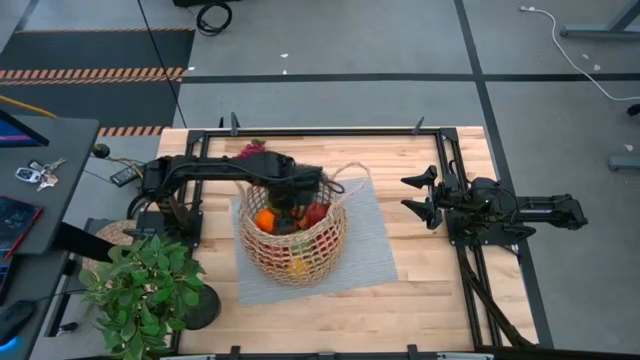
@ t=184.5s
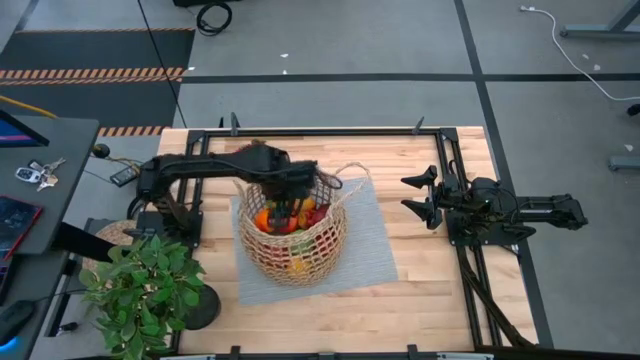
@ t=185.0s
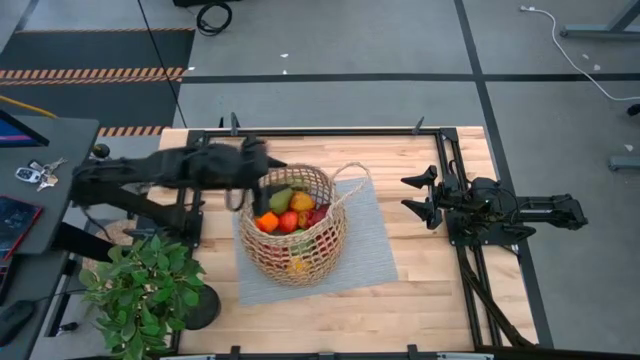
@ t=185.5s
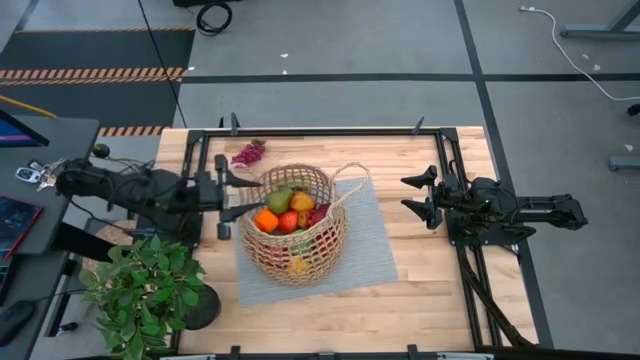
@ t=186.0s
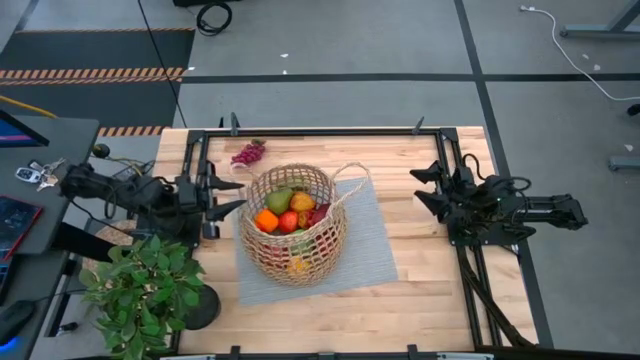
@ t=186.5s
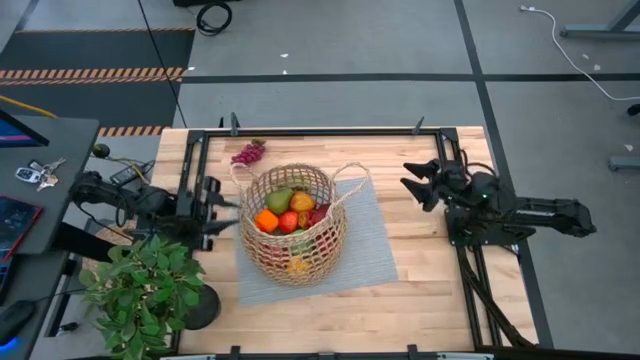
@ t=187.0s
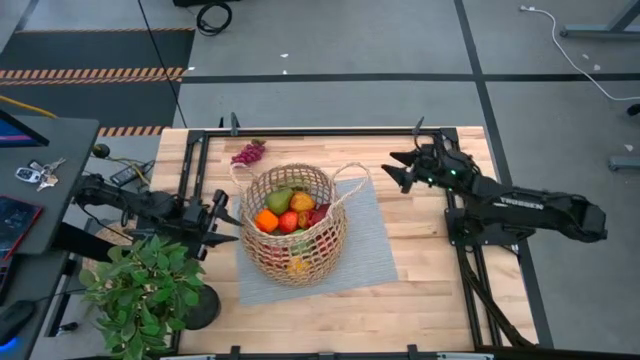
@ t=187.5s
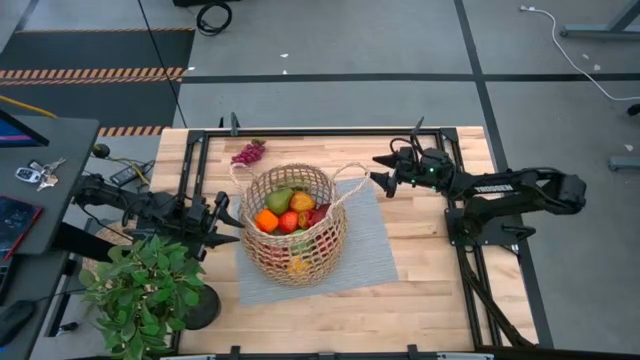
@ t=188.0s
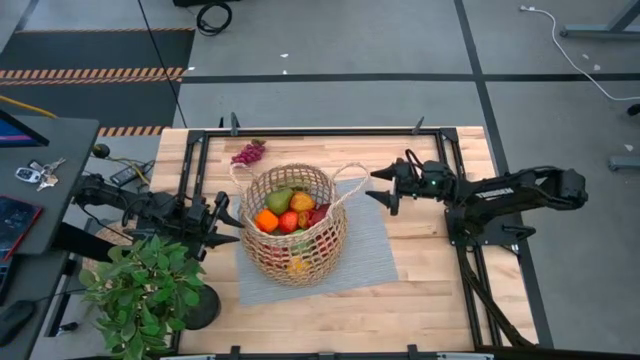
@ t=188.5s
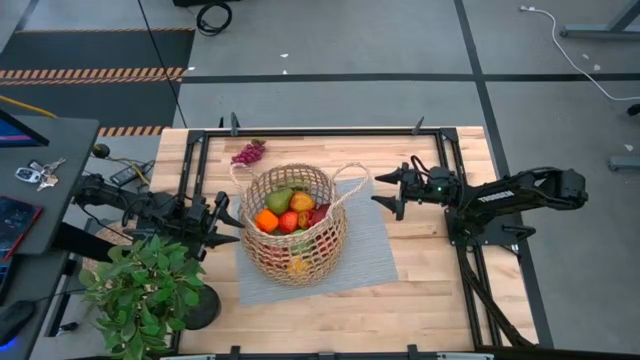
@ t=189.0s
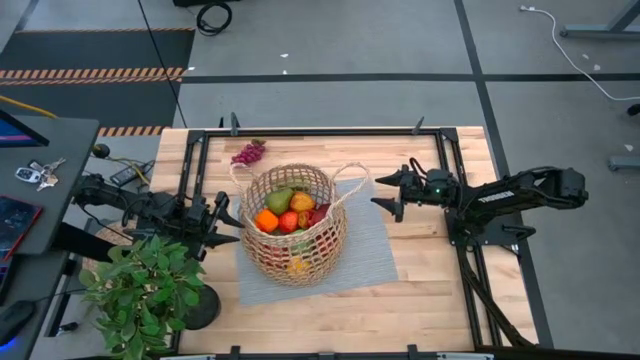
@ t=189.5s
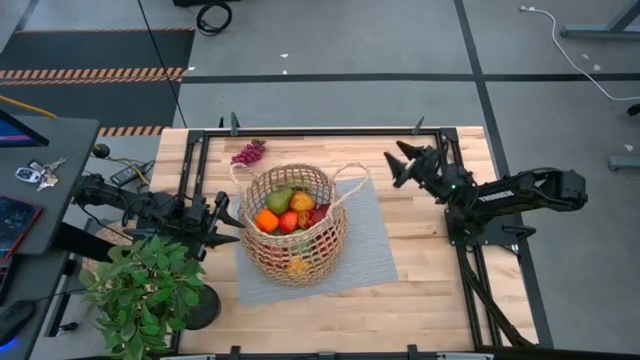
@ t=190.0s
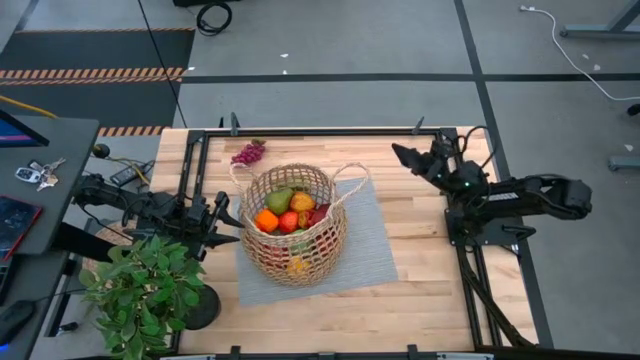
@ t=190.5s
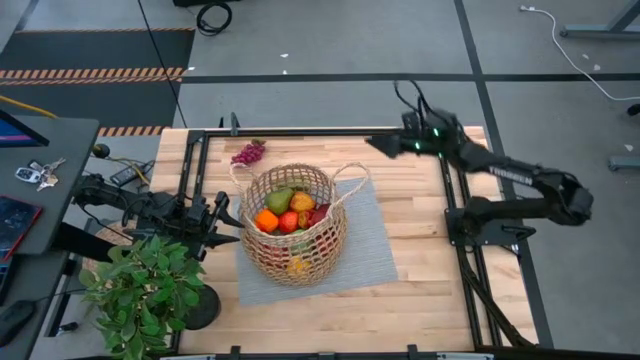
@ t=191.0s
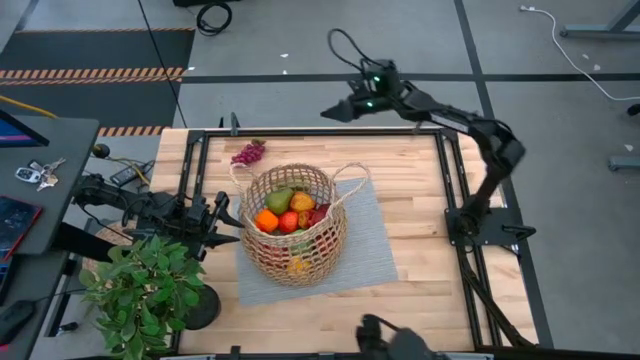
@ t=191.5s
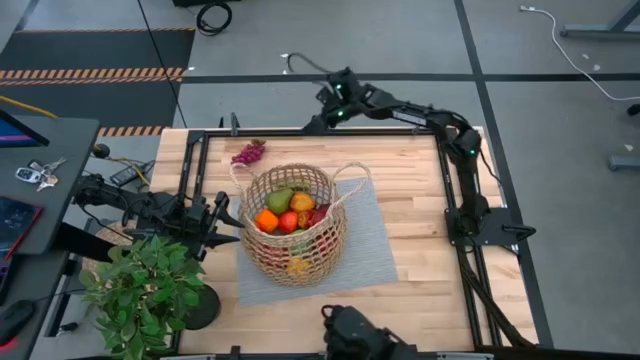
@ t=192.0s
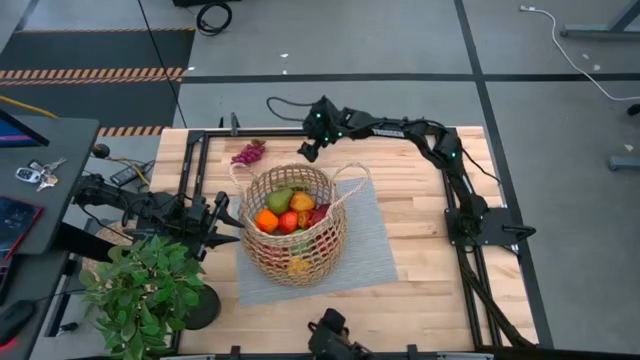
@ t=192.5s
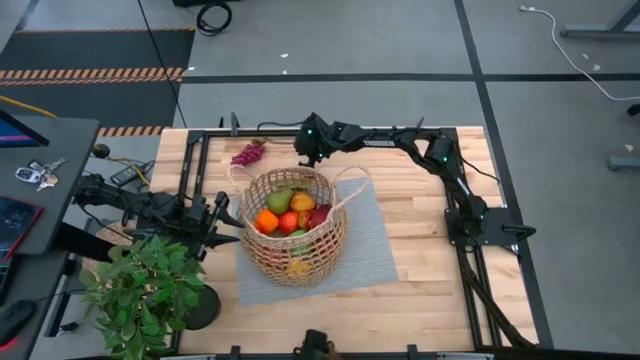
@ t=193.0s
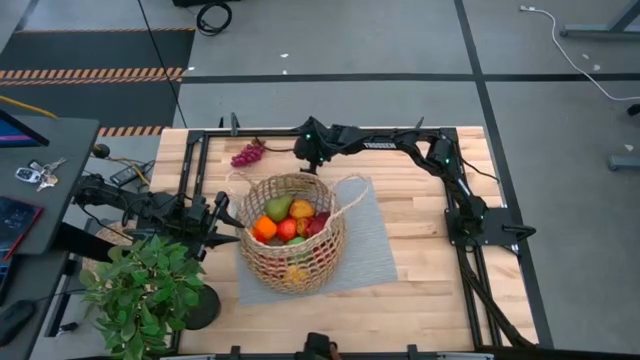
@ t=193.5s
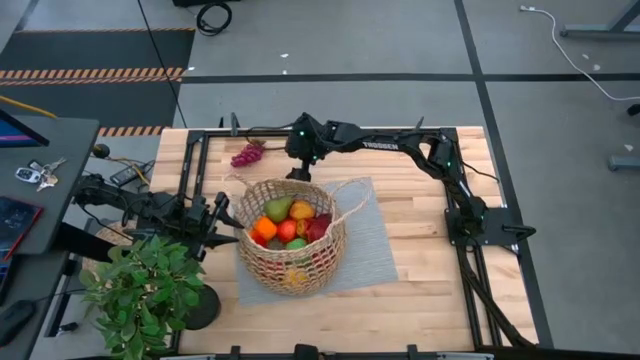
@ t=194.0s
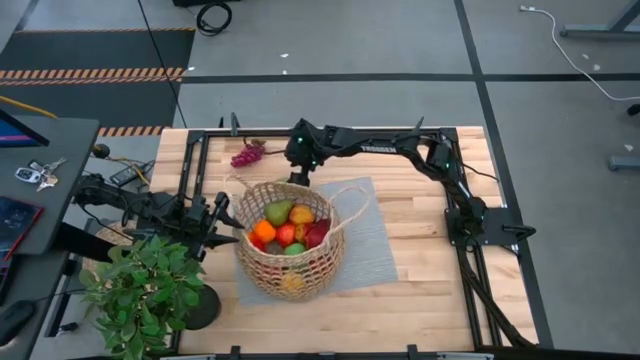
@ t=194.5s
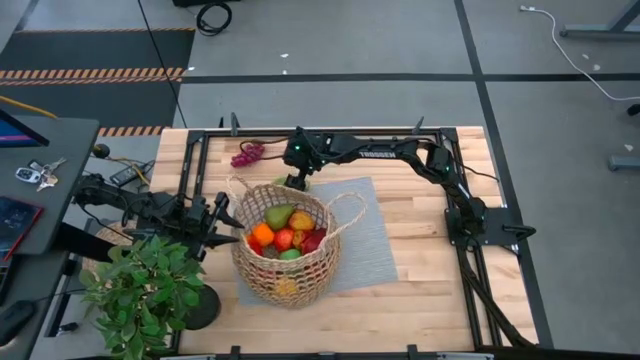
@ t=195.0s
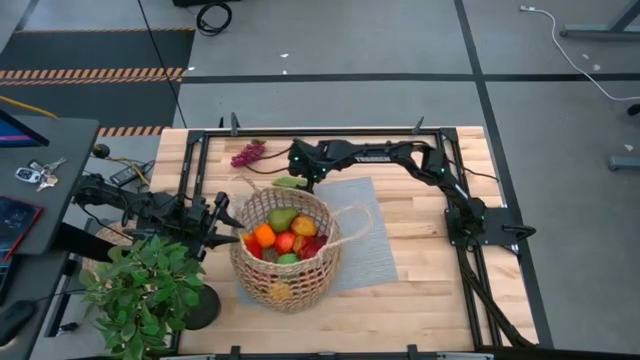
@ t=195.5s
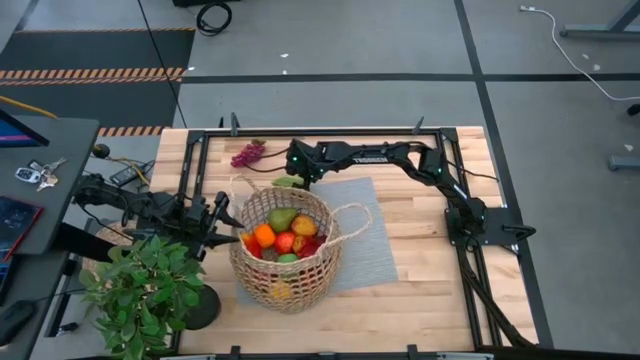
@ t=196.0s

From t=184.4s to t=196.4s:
Task: Build produce basket
Put the green cucumber into the brown woven basket

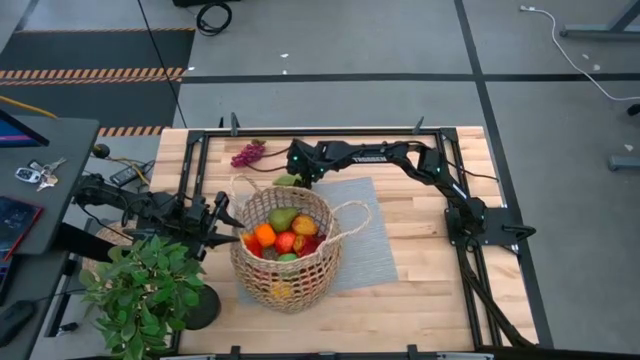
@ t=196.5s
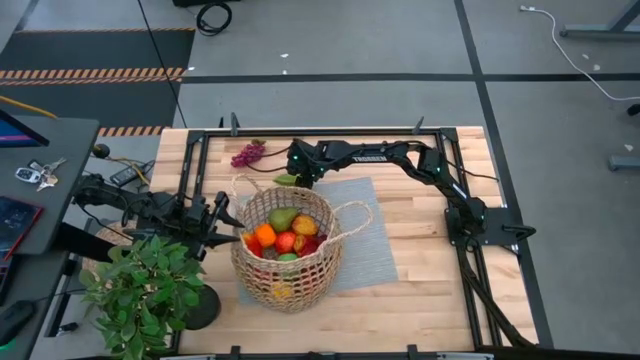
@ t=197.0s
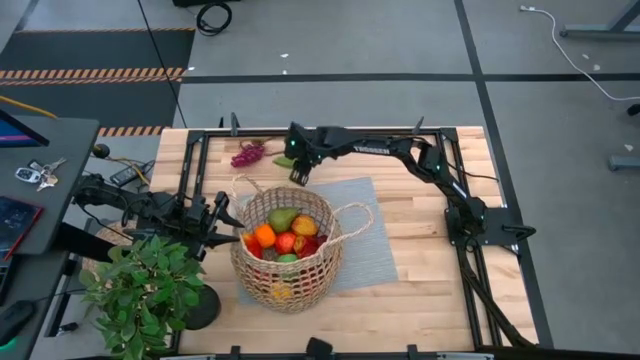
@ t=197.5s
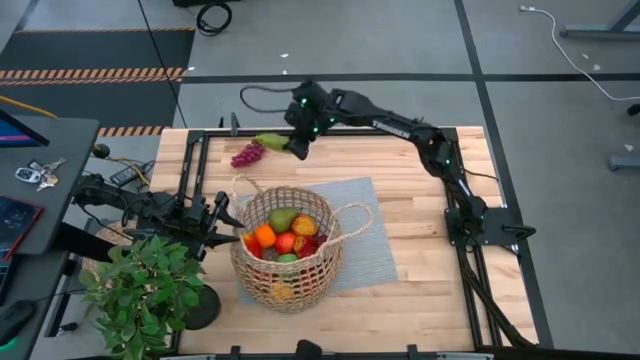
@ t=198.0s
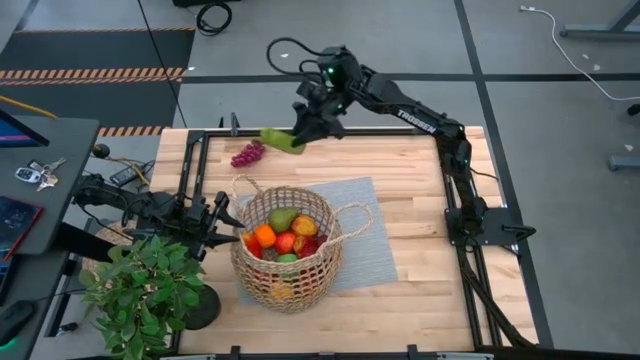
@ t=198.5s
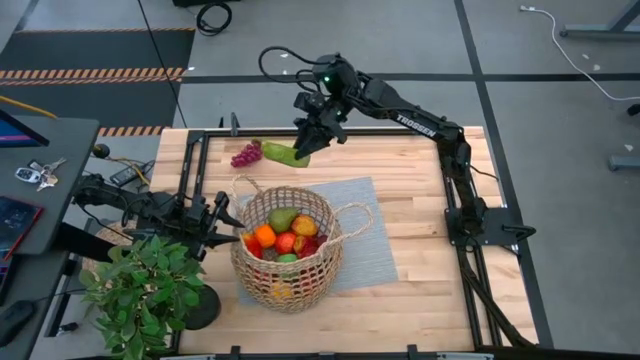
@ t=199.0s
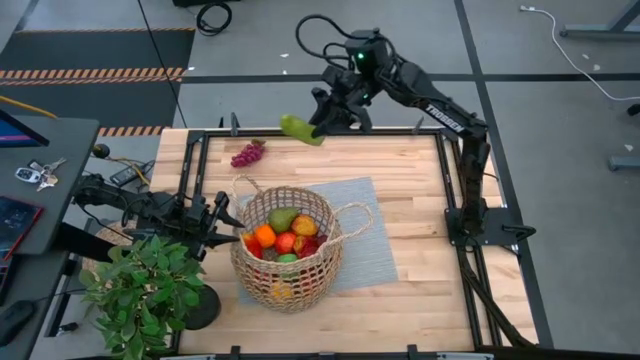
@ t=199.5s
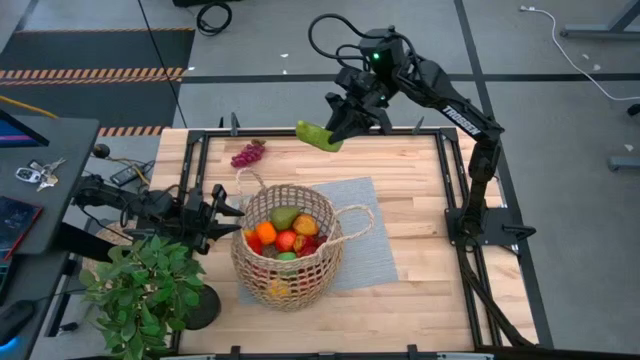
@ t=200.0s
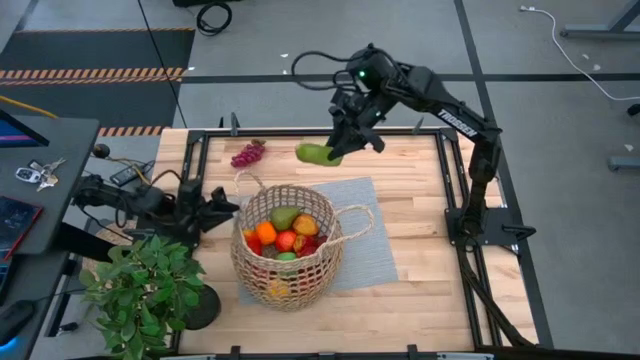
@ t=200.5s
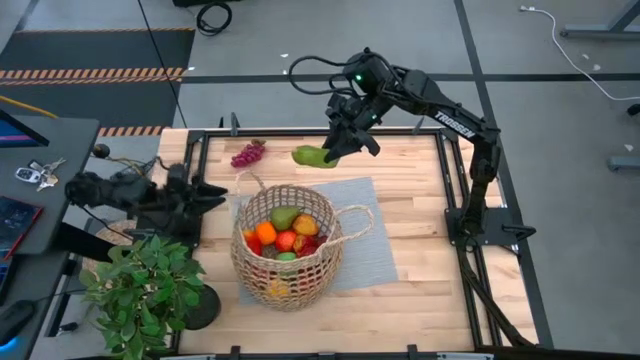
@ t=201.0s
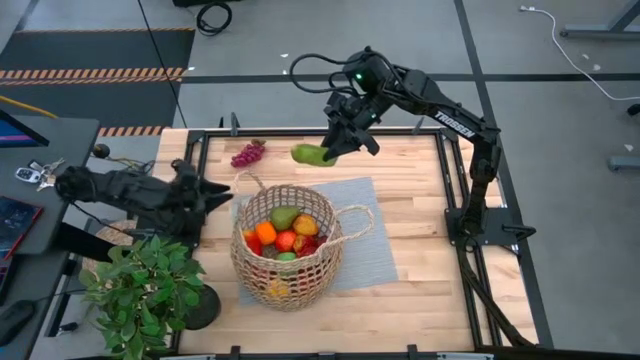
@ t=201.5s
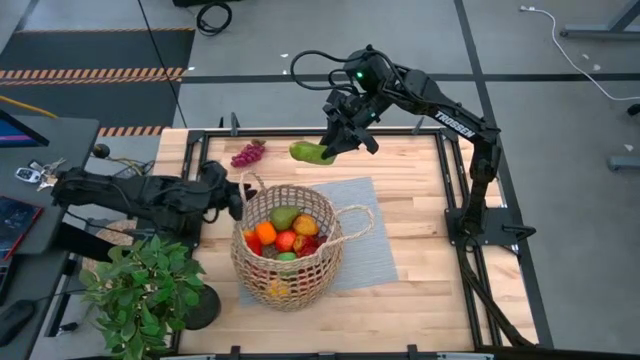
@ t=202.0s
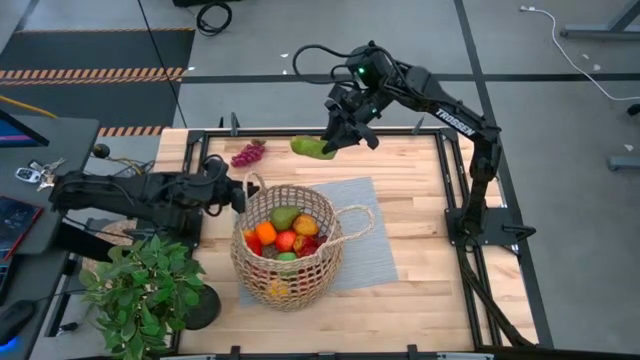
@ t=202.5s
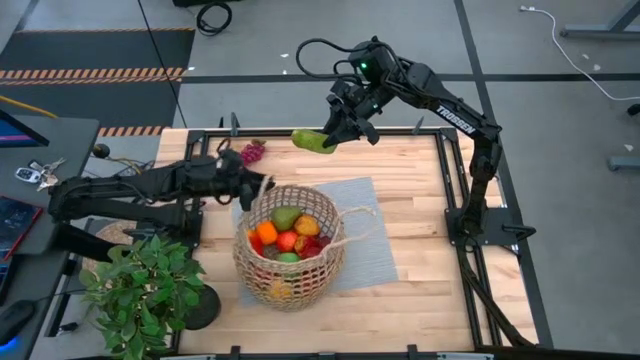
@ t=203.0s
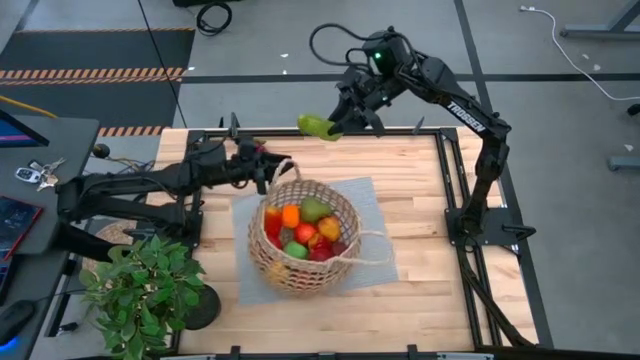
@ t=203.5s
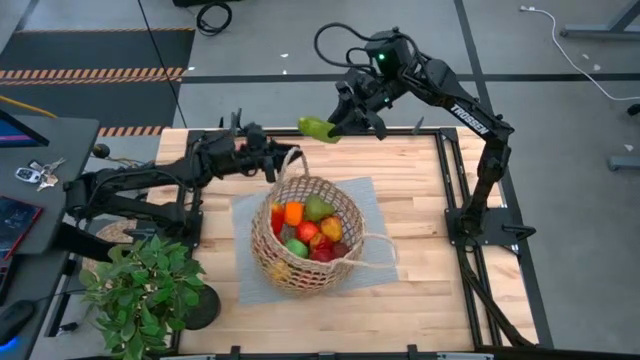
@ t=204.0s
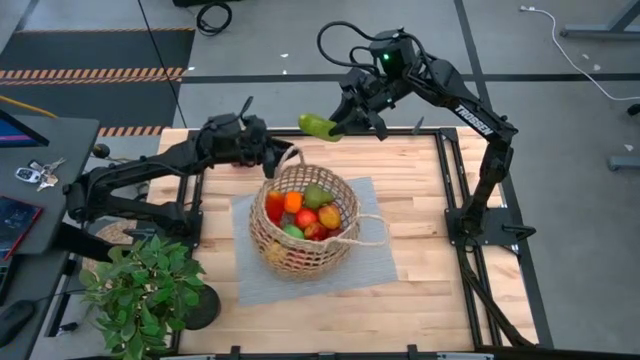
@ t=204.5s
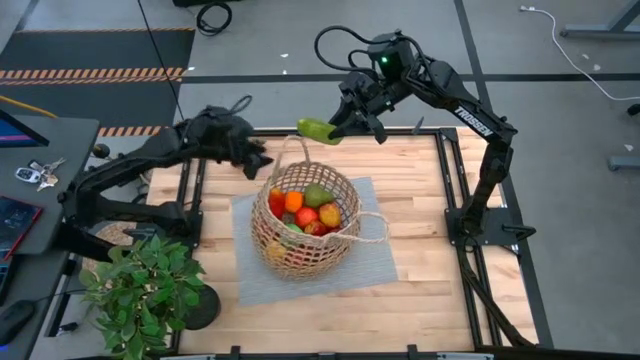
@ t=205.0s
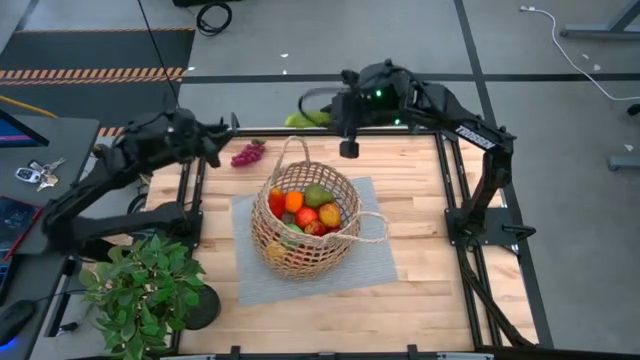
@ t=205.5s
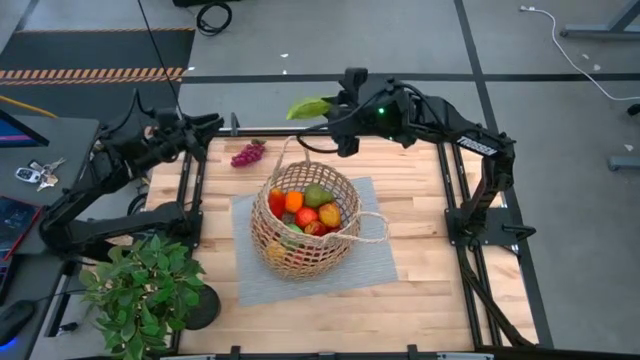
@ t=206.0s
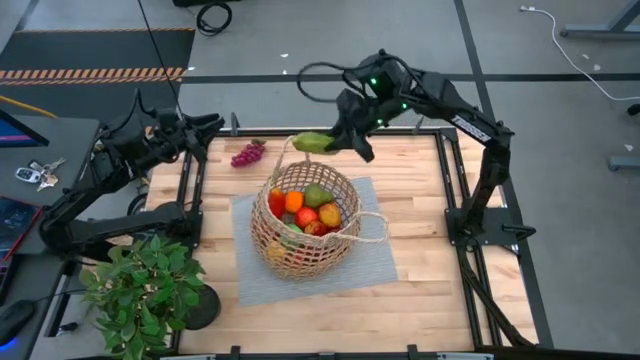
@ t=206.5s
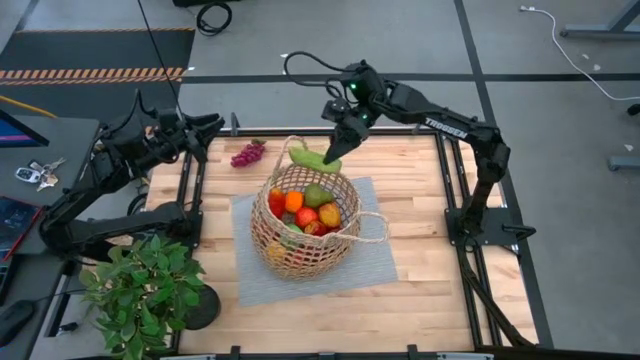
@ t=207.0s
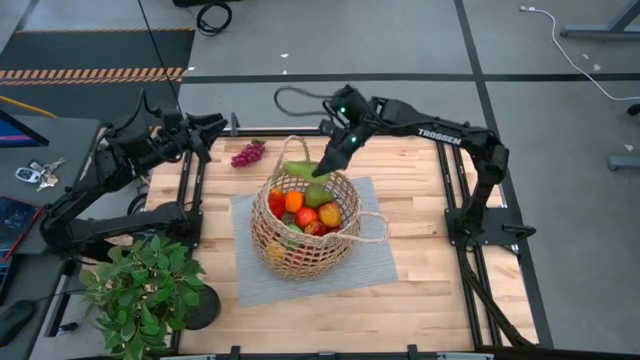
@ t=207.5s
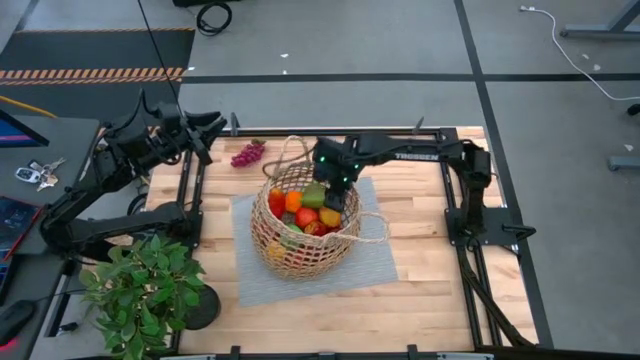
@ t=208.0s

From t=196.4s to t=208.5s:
Put the green cucumber into the brown woven basket
